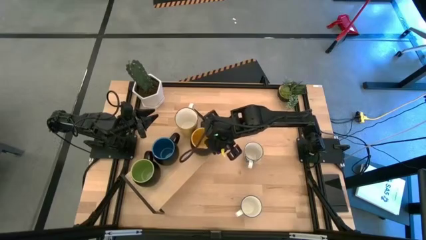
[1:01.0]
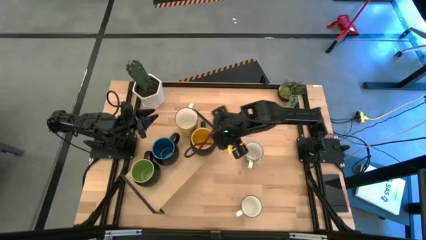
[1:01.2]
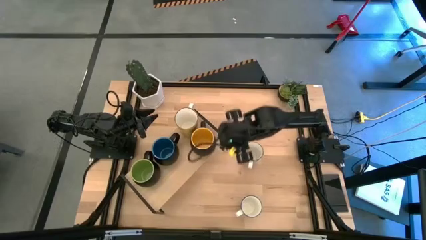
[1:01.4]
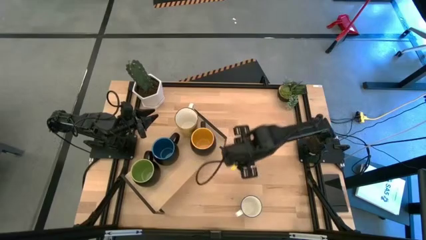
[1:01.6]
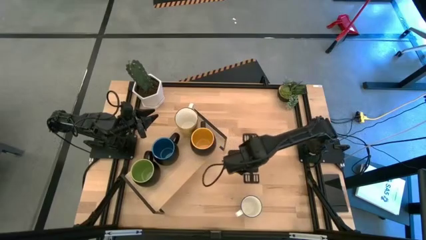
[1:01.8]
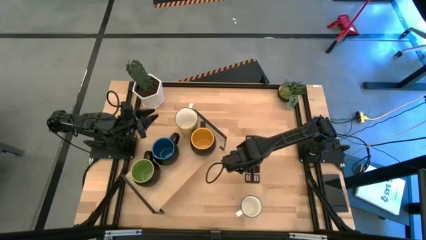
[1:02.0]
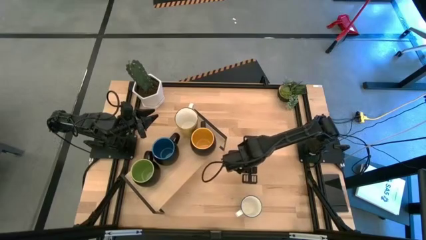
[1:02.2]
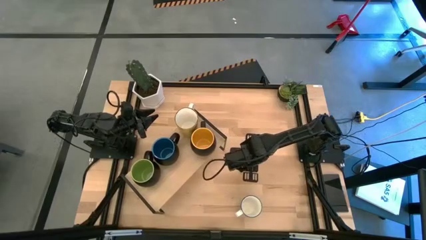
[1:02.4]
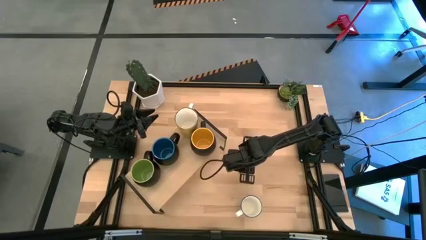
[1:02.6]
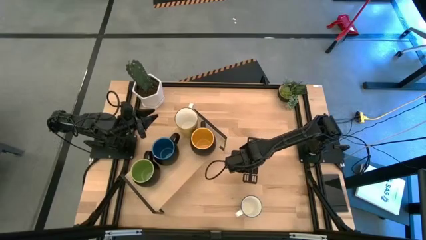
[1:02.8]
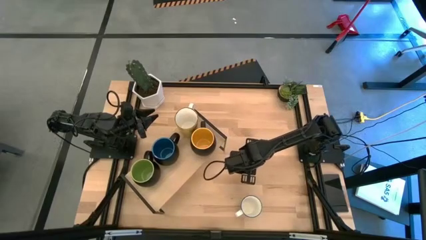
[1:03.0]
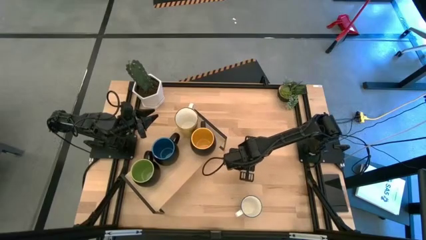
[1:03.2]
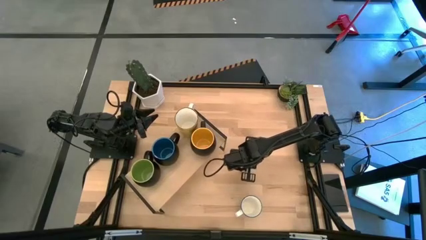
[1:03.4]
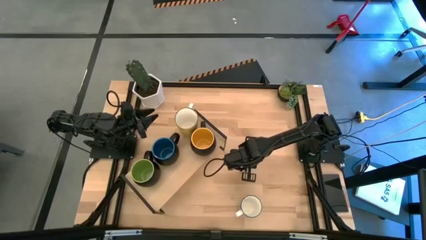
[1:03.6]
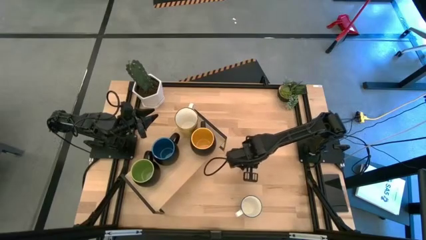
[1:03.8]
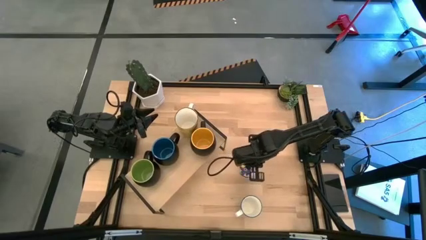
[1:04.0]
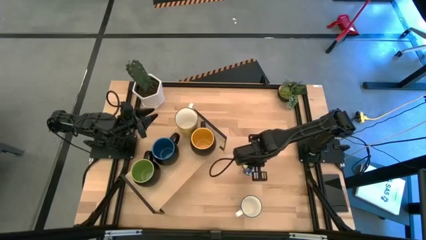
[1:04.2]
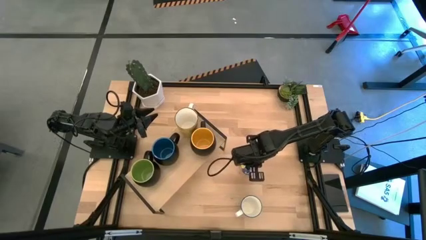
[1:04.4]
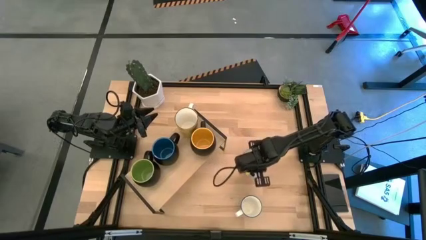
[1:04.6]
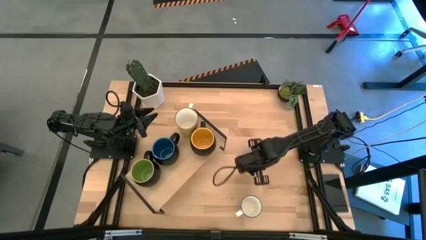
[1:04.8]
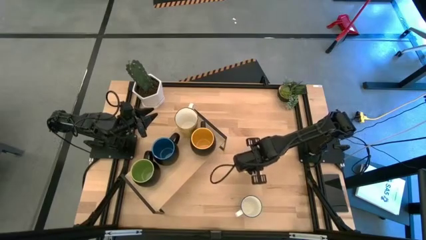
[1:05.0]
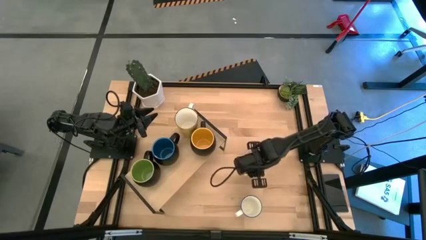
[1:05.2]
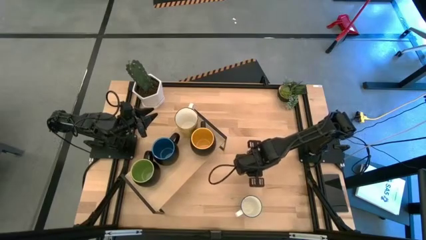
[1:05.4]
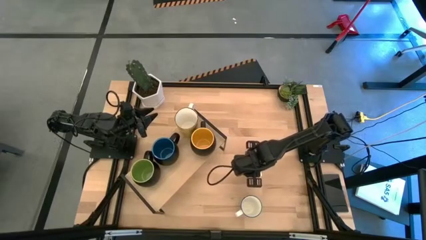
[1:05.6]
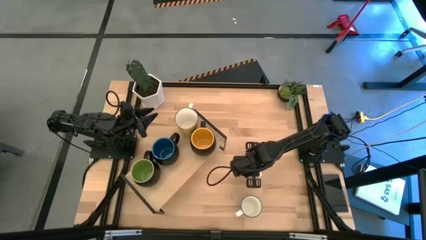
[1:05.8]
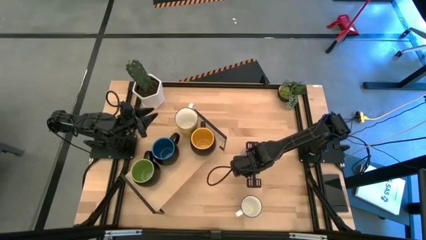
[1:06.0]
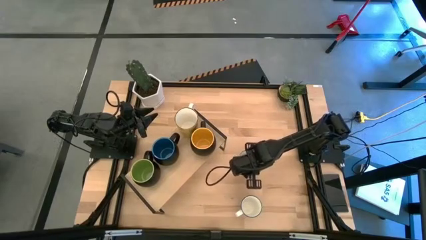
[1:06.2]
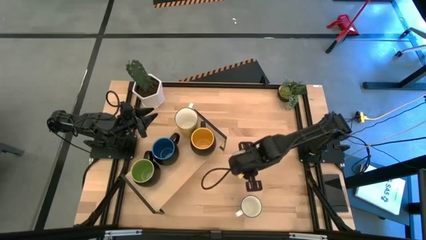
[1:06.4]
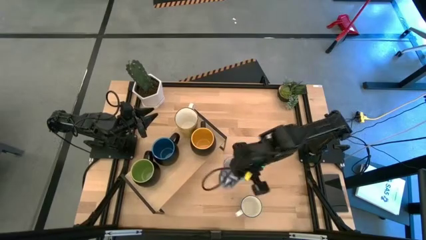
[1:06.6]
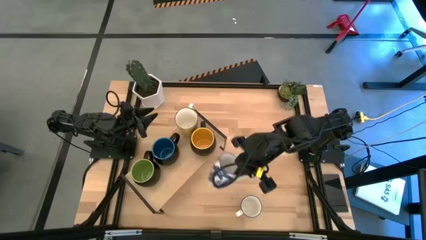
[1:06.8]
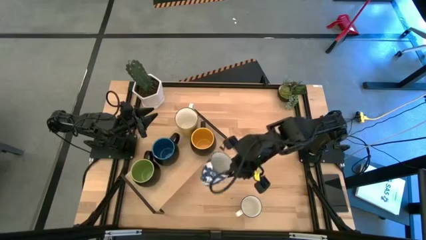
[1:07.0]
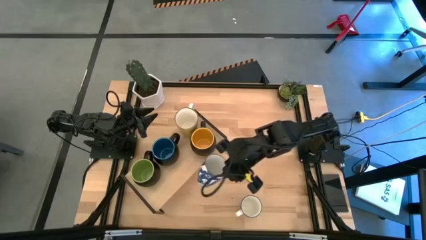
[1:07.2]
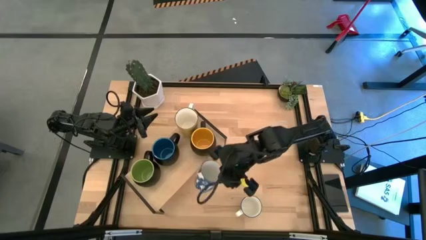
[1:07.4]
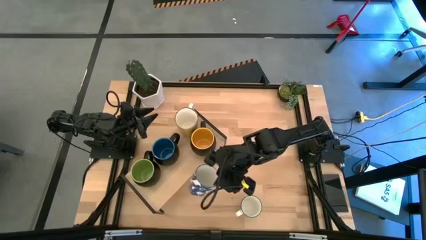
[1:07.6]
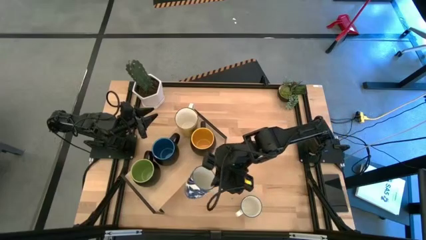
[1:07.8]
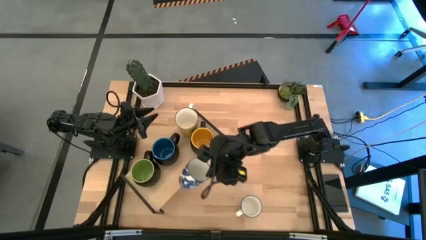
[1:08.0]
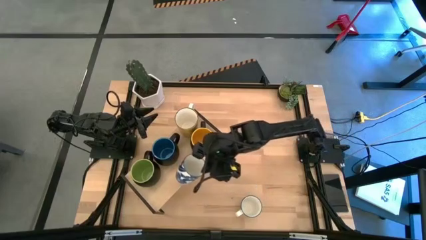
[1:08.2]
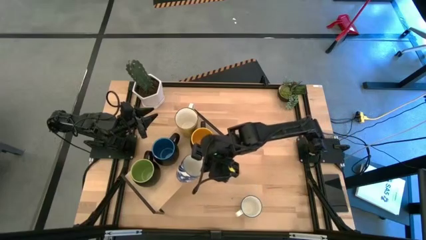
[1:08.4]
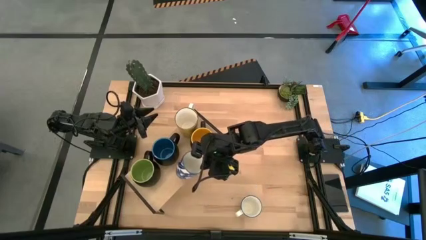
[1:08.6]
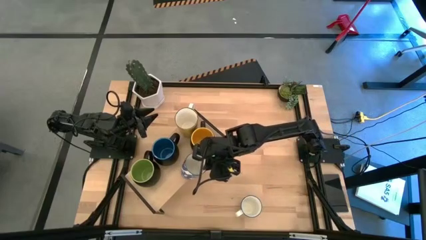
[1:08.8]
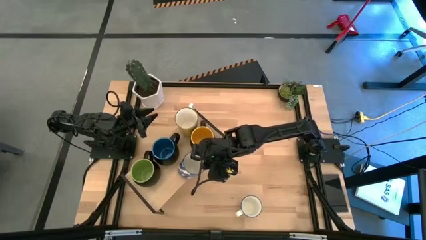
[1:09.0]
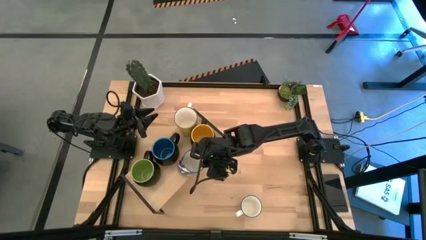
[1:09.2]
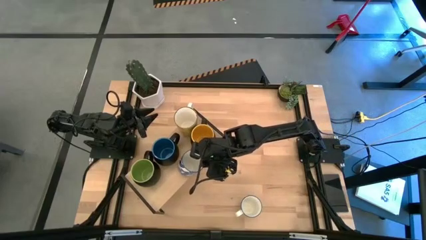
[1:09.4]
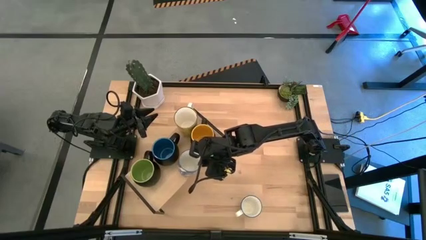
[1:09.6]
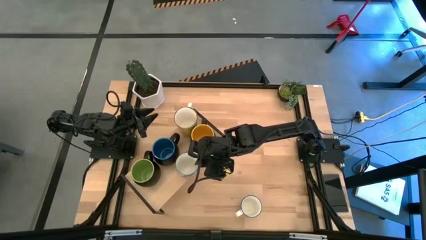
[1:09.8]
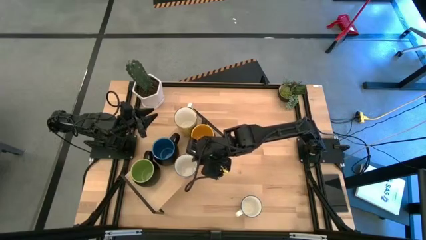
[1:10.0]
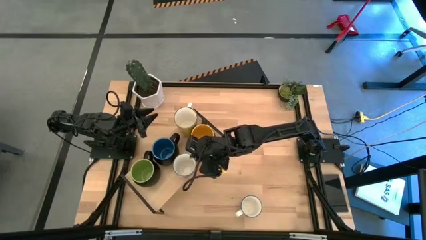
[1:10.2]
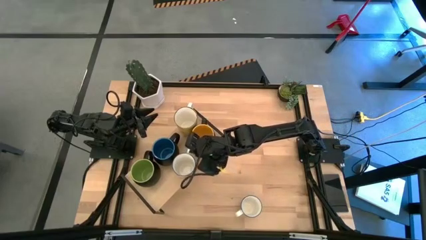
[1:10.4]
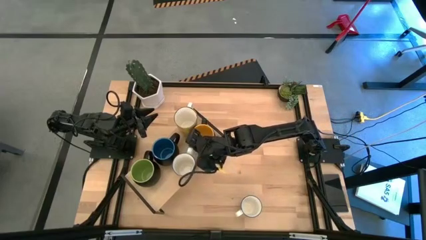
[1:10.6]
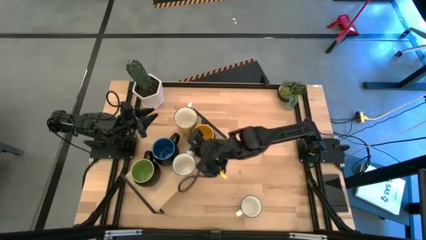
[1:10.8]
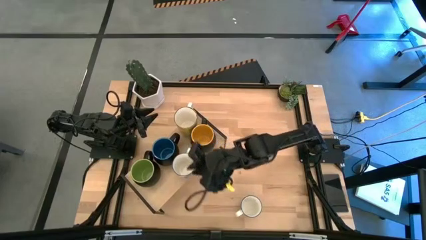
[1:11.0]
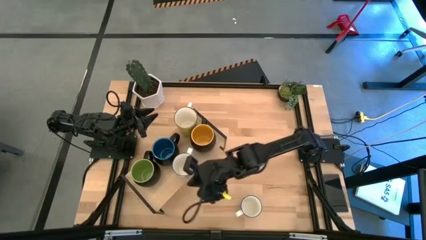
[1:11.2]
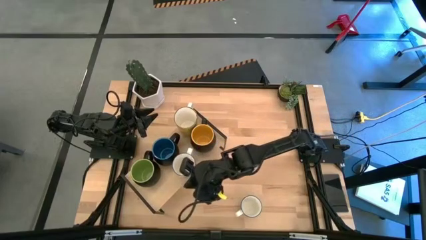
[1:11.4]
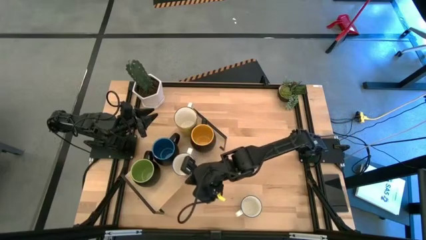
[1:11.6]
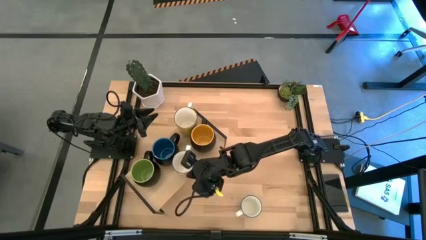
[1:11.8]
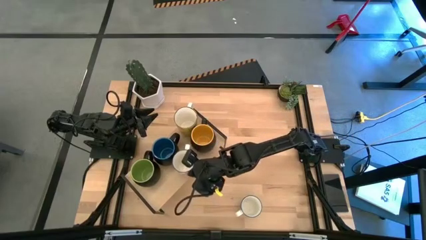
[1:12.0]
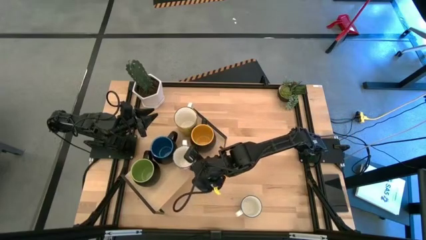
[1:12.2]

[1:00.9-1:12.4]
Task: Place coffee mugs
Put the top blue white mug on the shelf

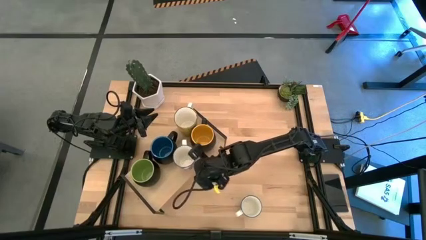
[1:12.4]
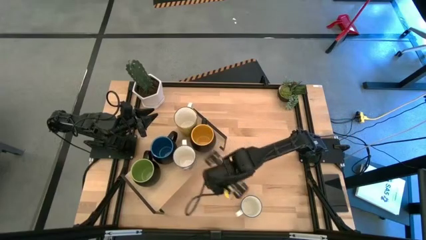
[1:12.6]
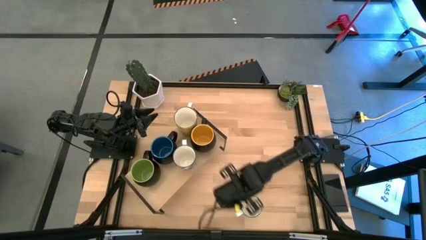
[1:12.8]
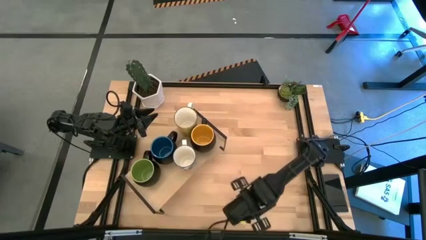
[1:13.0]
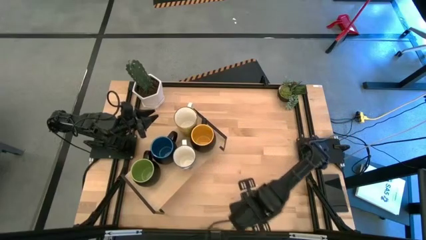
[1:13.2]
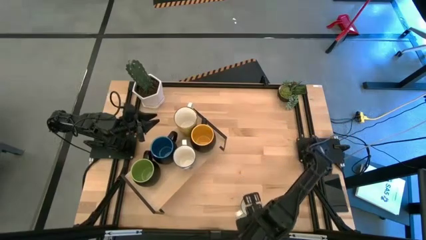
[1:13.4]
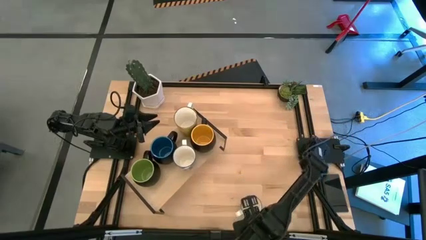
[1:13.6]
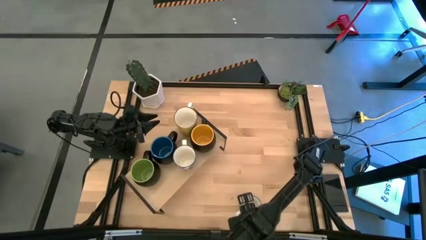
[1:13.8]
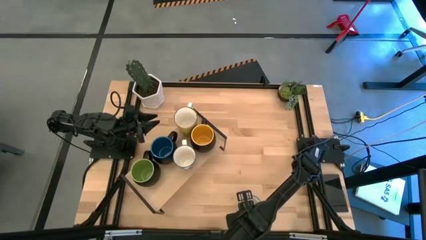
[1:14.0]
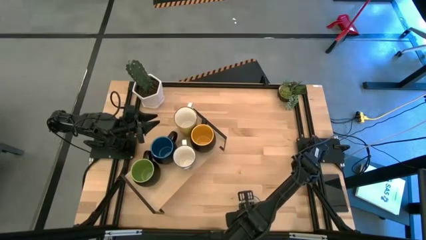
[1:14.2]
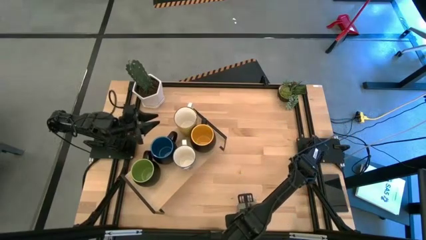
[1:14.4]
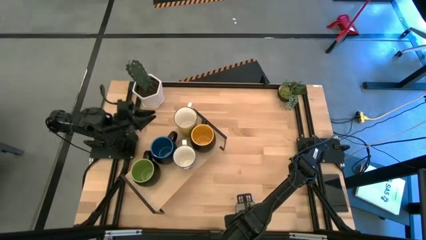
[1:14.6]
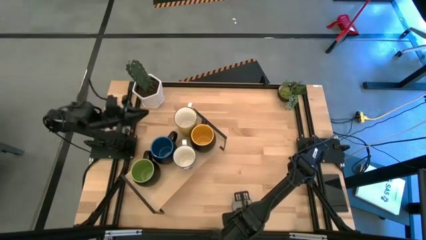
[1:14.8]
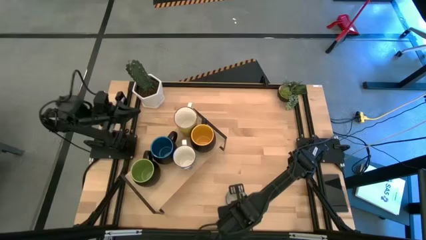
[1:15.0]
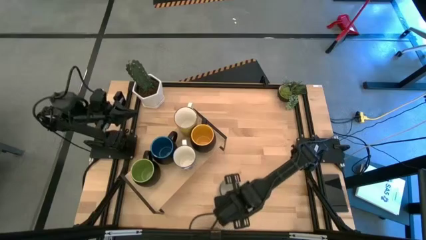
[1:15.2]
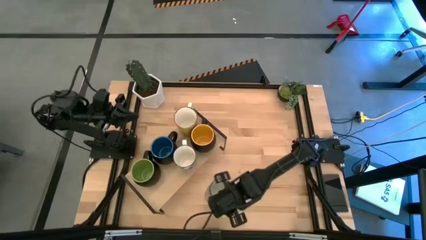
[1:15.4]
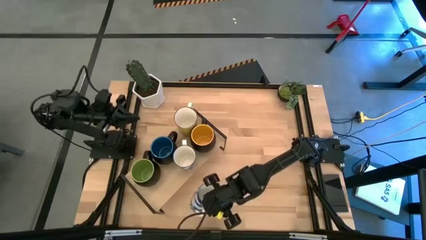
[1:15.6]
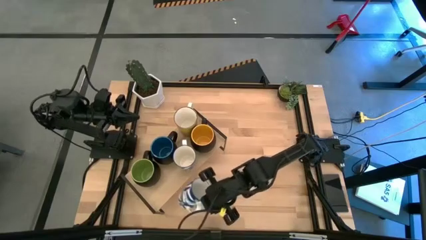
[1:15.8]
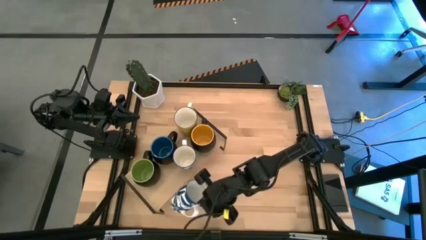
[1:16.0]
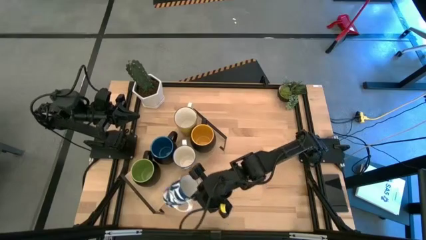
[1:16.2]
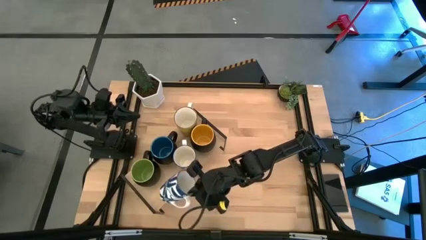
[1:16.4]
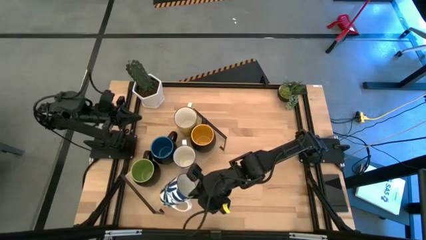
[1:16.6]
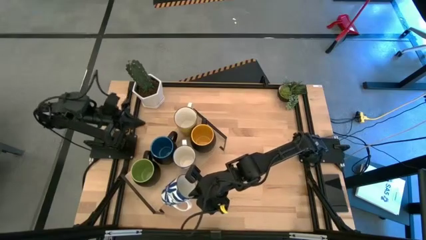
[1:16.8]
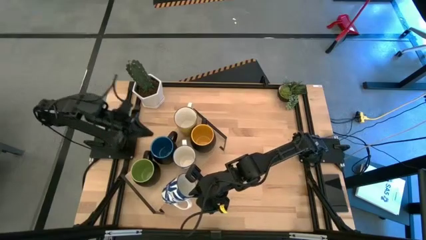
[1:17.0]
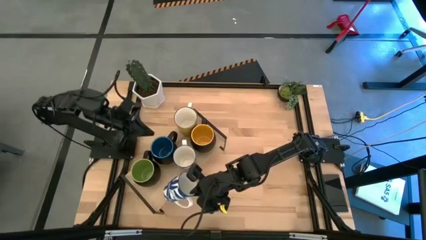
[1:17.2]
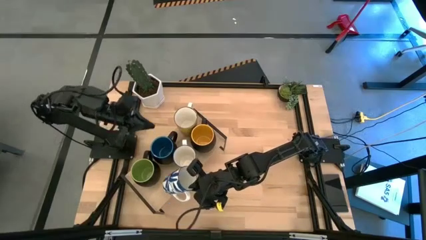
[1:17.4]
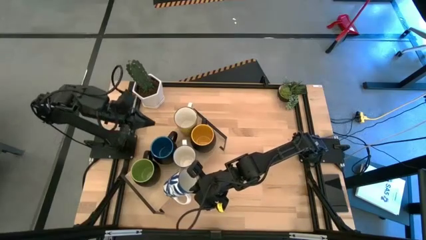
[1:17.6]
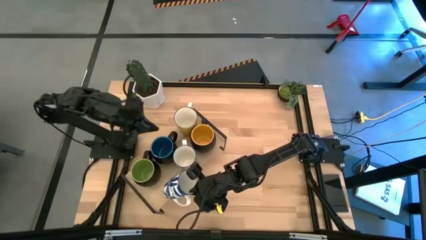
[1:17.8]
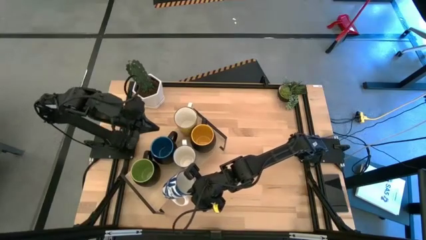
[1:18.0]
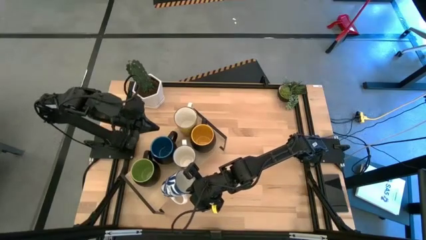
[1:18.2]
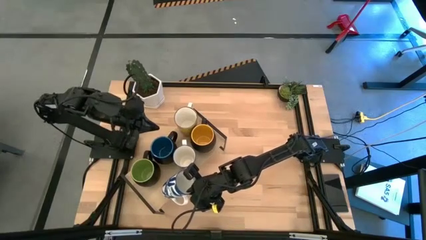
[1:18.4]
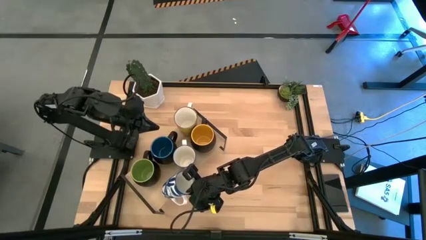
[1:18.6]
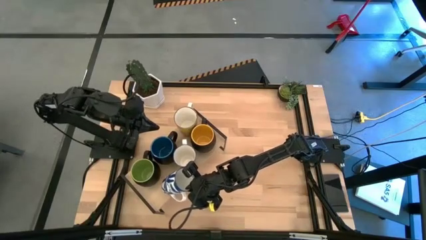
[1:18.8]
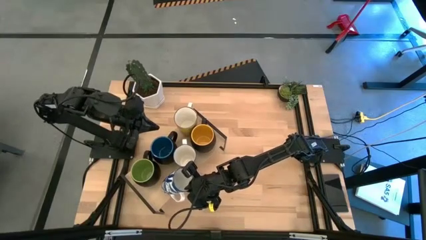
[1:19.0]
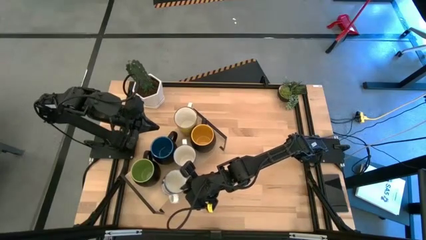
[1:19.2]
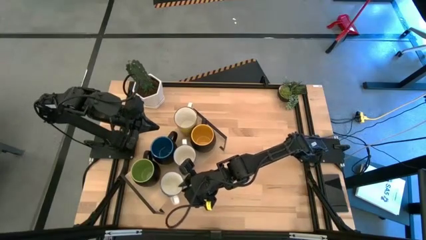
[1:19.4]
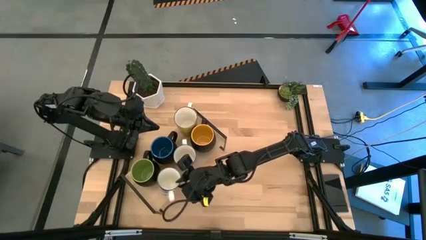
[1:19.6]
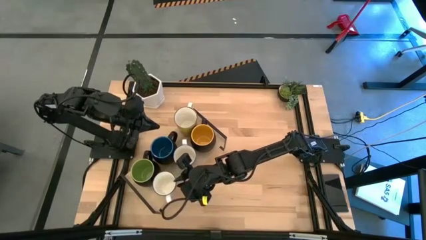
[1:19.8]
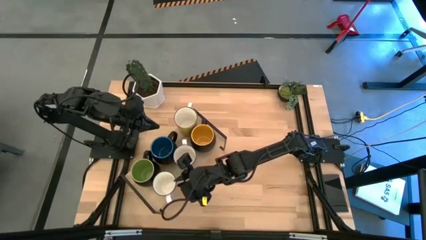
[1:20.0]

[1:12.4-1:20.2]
Put the blue white mug on the shelf
